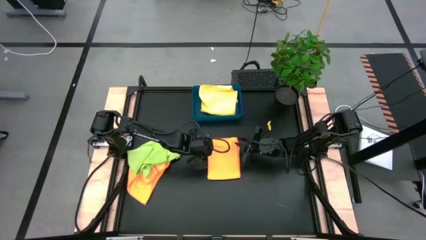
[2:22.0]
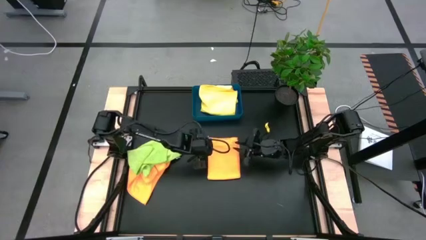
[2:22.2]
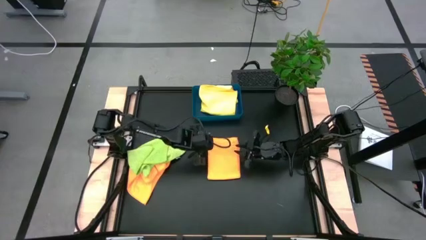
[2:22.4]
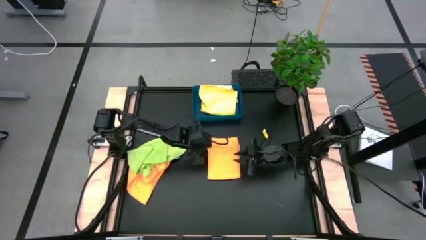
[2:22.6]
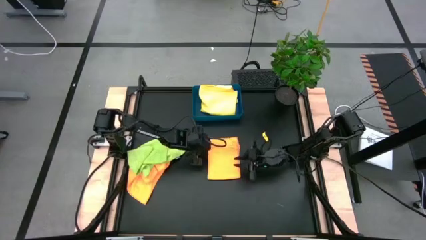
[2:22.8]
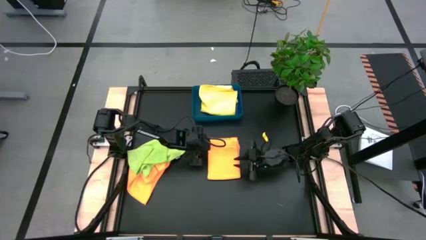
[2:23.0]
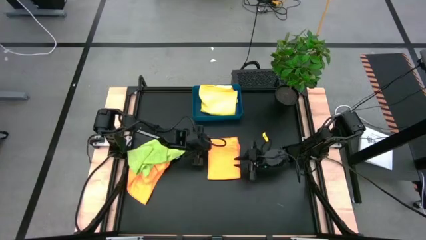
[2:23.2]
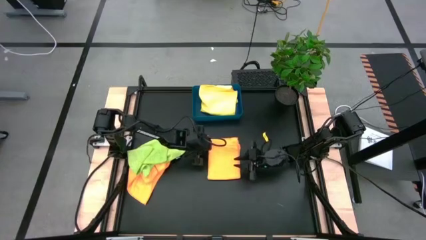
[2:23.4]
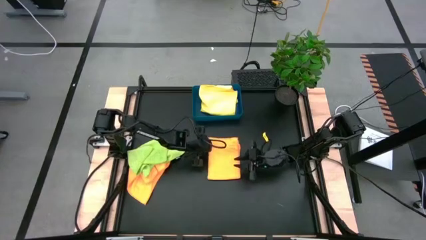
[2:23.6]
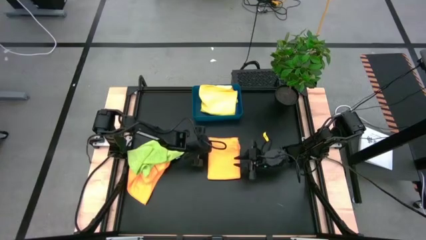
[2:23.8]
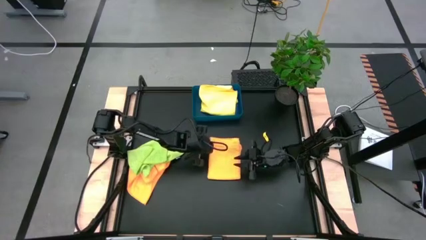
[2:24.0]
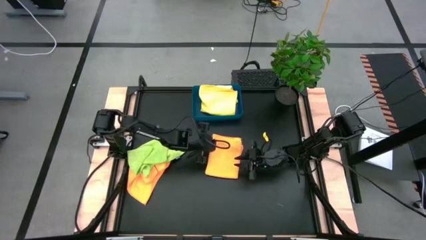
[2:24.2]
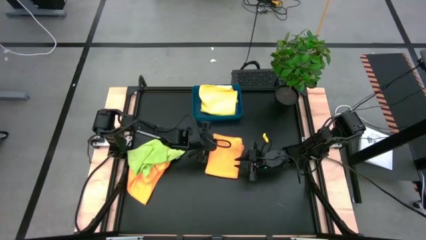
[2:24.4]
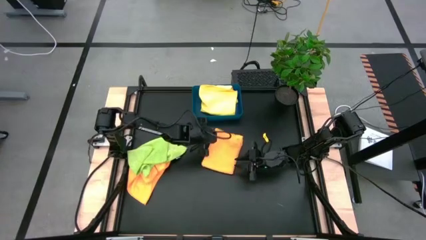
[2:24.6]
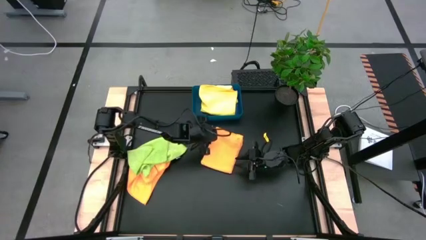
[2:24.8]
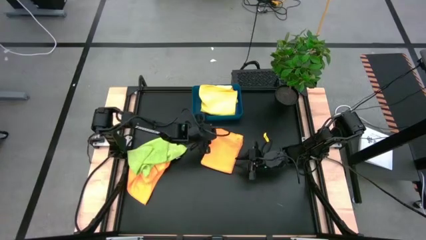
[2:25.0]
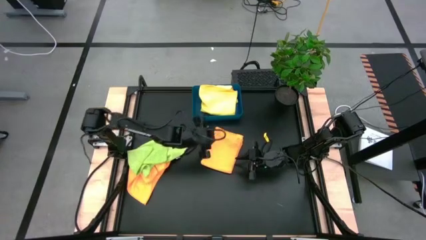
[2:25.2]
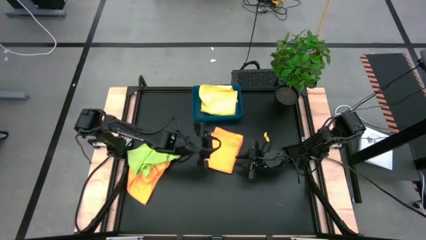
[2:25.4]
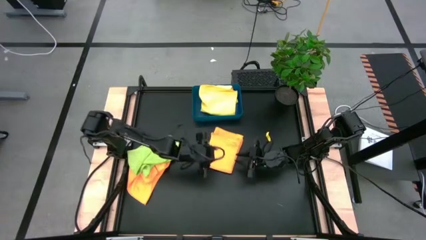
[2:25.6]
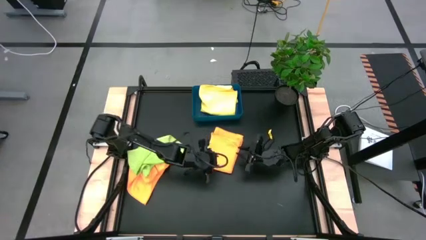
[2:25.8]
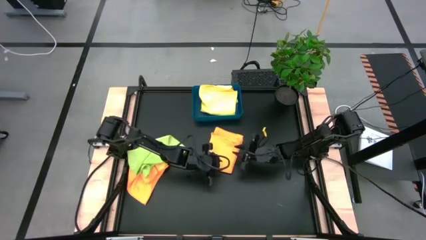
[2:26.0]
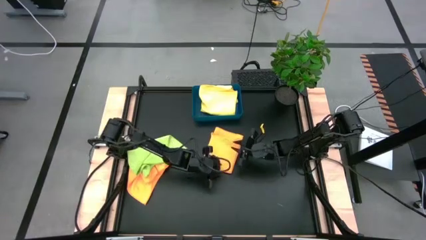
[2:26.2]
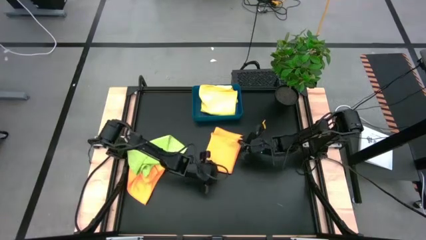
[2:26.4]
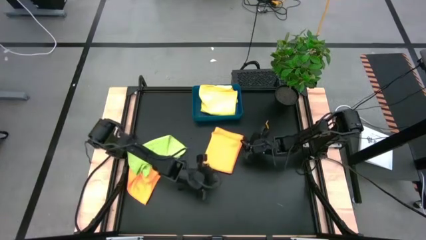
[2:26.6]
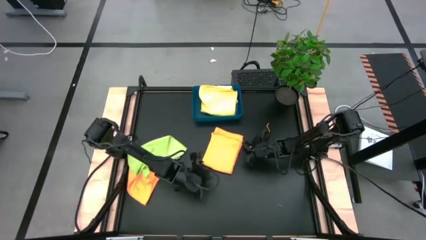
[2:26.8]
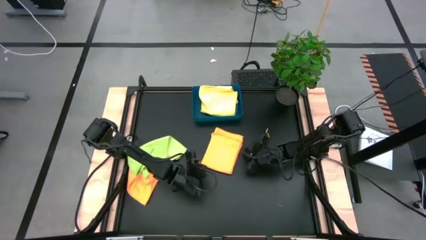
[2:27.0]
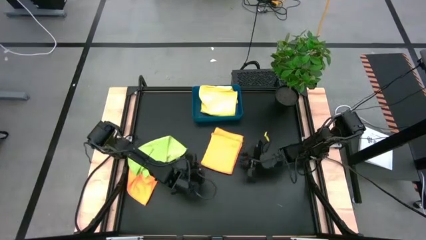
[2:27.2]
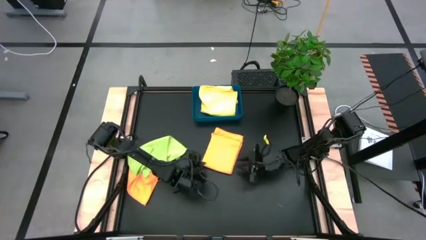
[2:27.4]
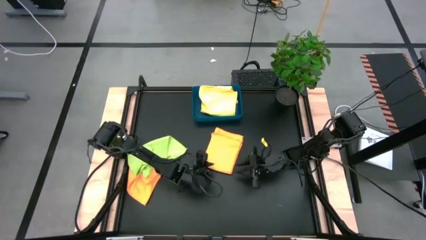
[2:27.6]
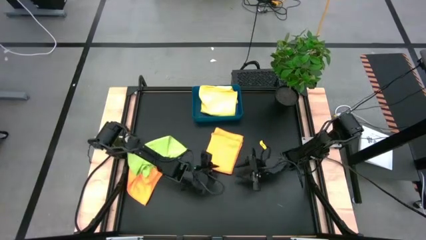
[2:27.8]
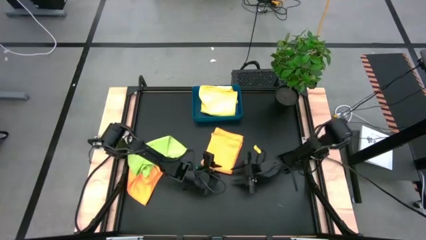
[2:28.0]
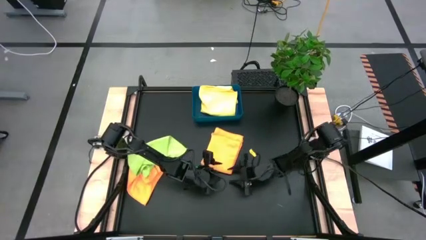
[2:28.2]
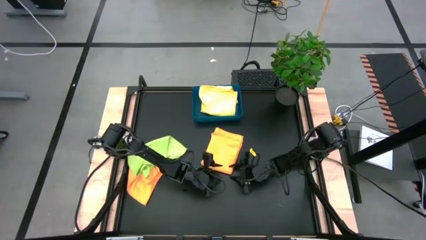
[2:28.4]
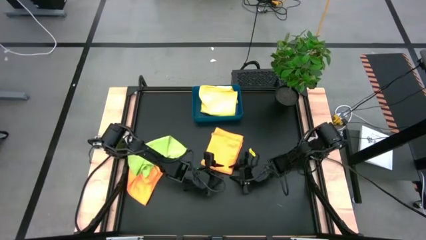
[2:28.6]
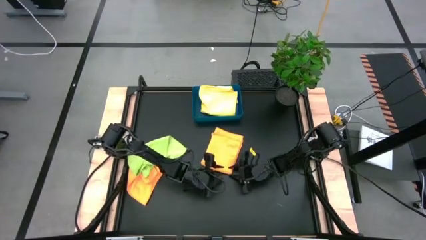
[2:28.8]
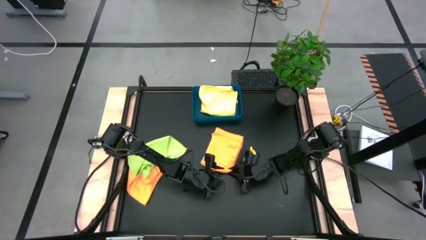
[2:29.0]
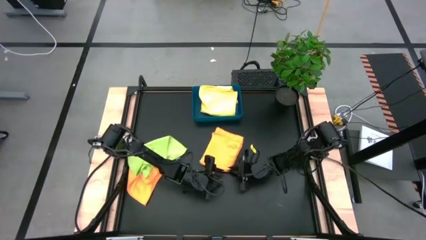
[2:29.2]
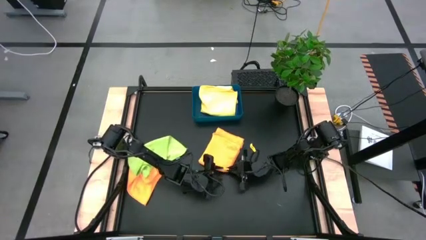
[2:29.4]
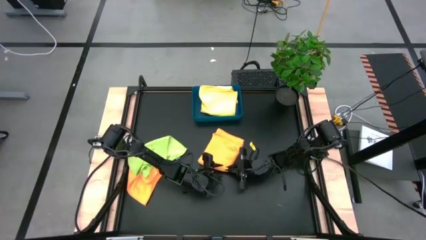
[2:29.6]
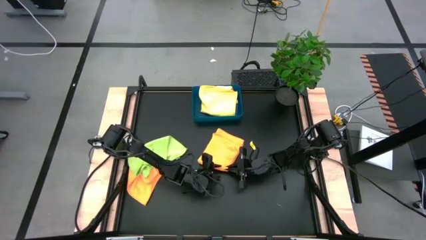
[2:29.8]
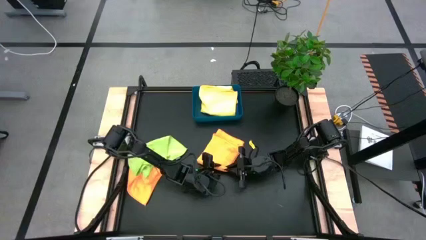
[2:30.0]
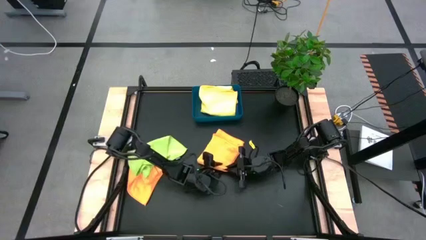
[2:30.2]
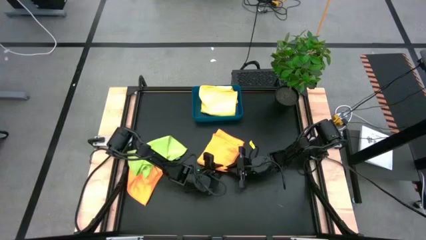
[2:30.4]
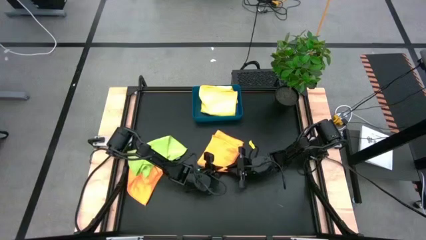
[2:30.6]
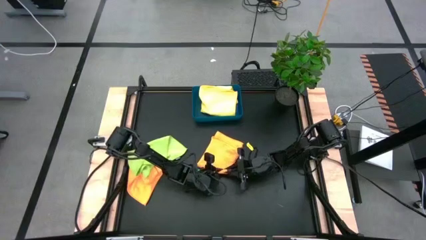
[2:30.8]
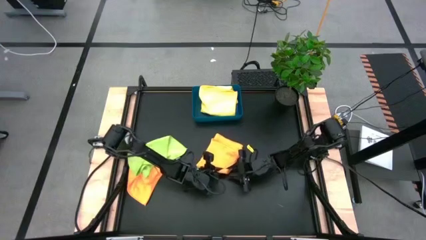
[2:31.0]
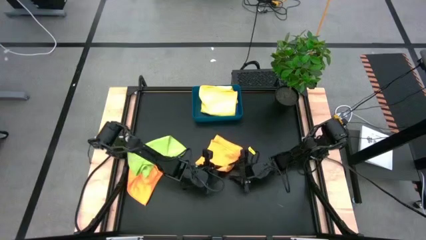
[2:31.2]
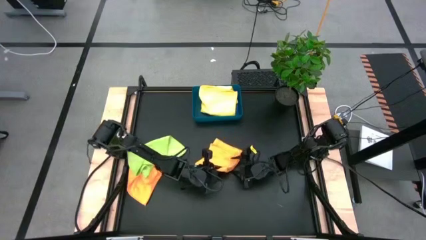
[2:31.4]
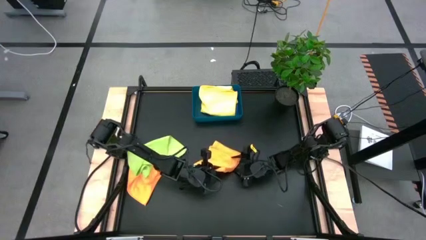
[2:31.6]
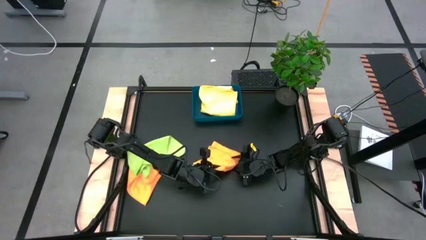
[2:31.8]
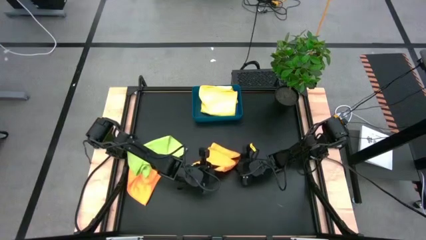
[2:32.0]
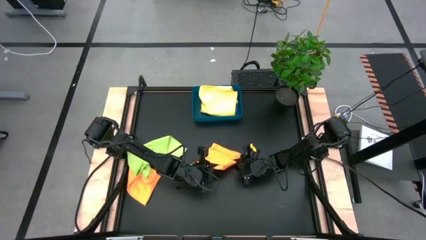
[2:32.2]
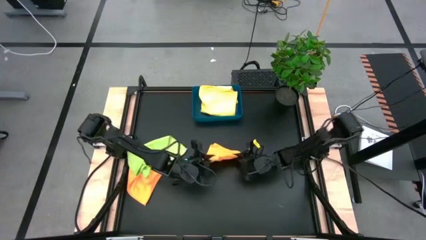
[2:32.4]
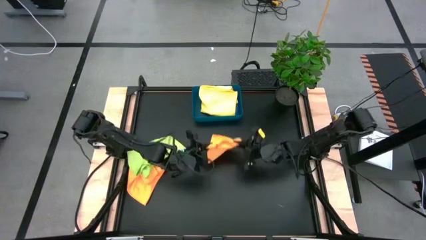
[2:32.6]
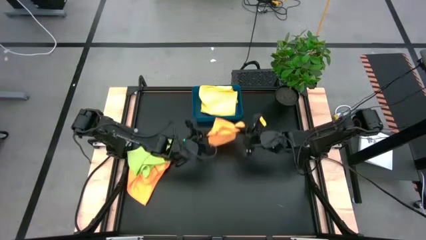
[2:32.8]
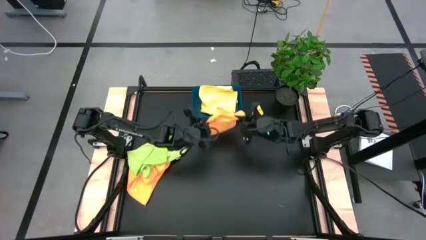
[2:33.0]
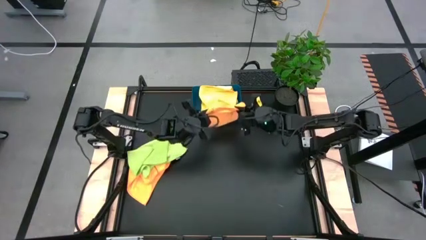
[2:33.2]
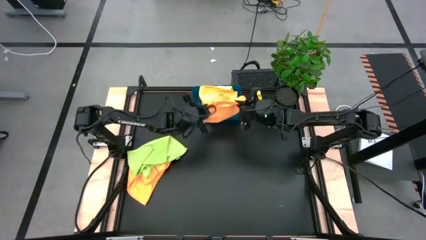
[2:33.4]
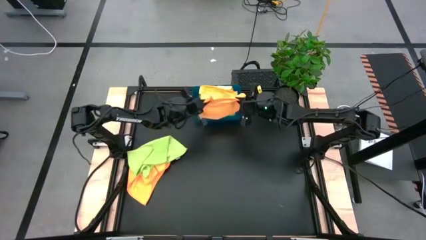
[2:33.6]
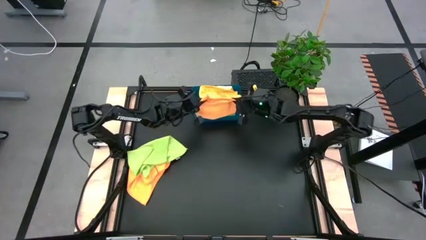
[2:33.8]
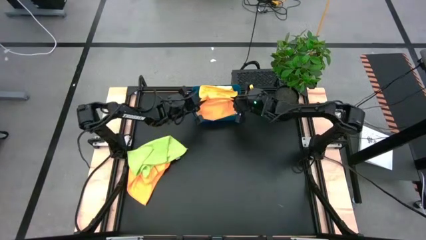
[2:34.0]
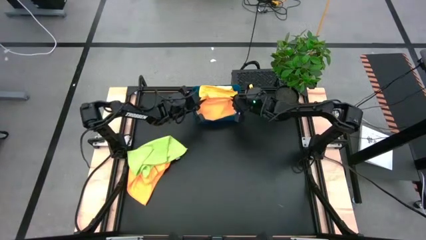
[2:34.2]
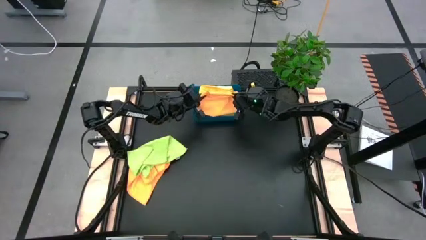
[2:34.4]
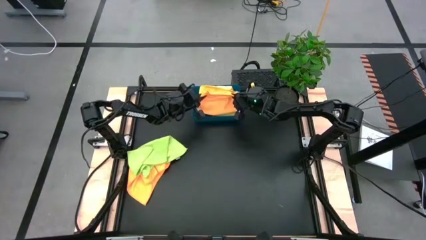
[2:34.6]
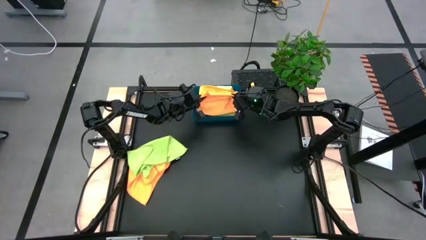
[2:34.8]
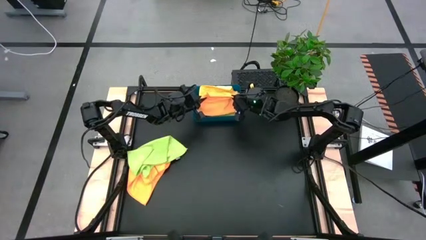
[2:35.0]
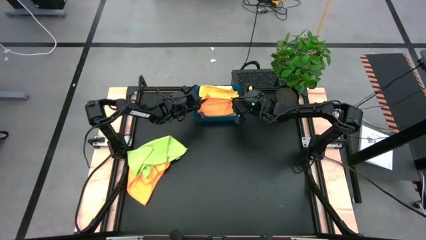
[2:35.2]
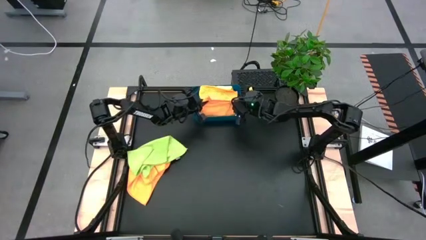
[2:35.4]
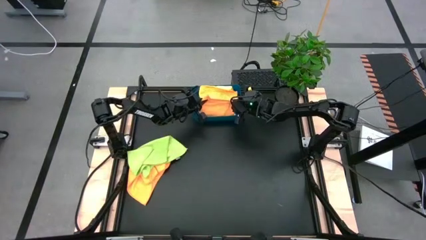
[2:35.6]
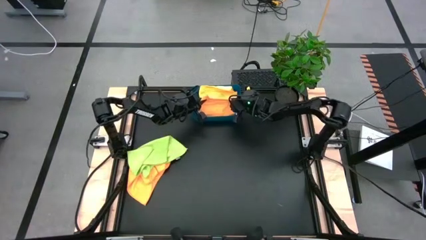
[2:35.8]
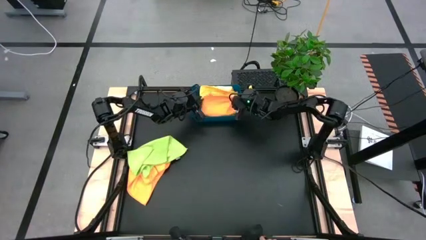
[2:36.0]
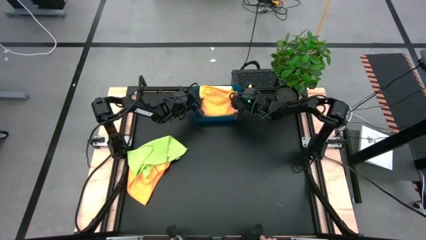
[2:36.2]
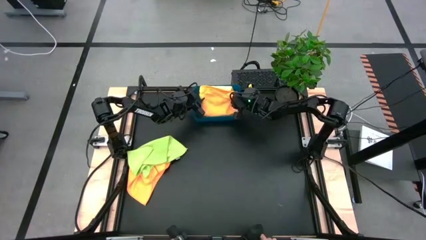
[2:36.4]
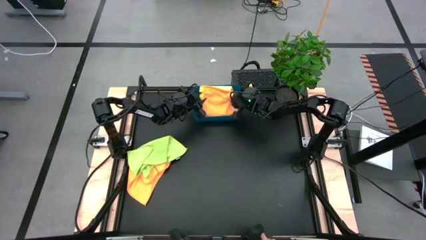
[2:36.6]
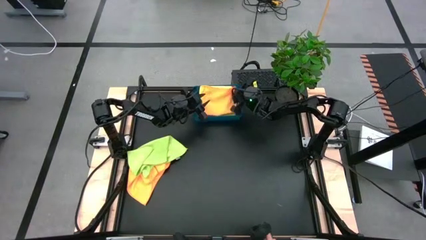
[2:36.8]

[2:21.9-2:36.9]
Task: Fold microfiber towels
Stack the right orange microfiber cloth on top of the yellow microfiber cloth in the blue bin
